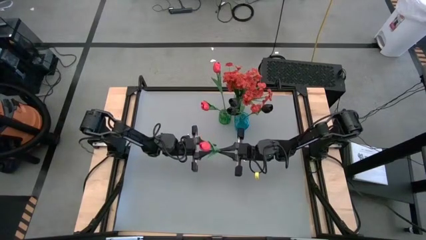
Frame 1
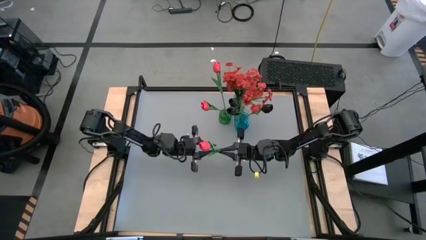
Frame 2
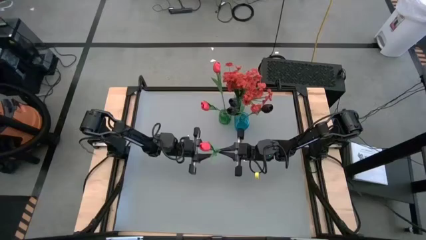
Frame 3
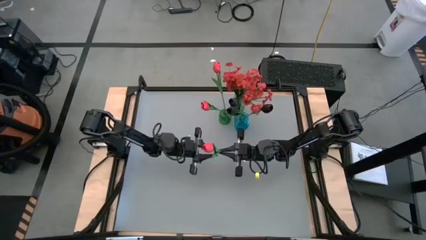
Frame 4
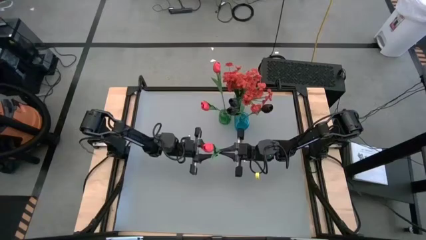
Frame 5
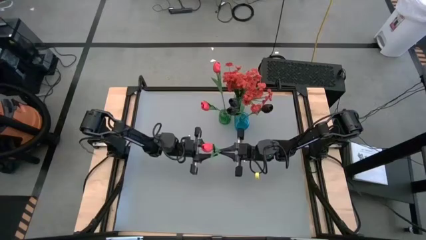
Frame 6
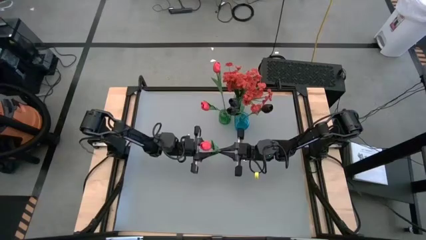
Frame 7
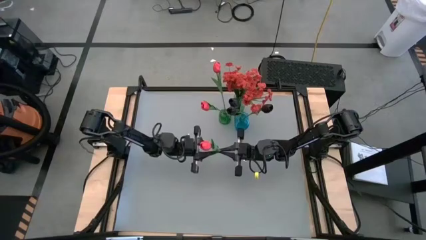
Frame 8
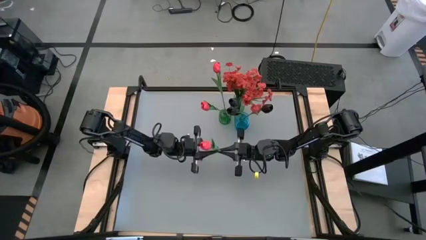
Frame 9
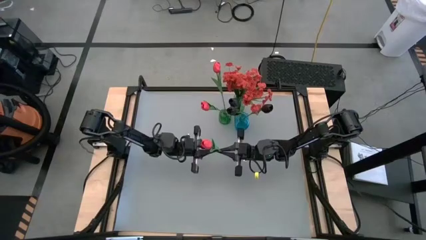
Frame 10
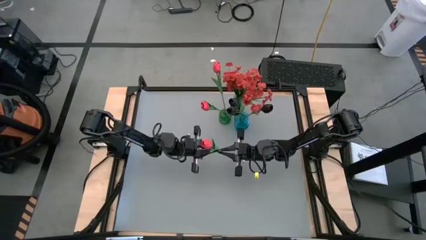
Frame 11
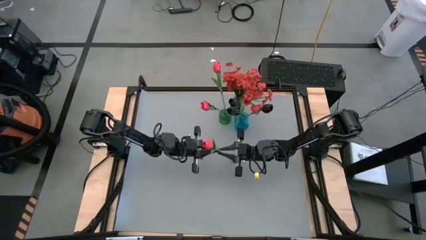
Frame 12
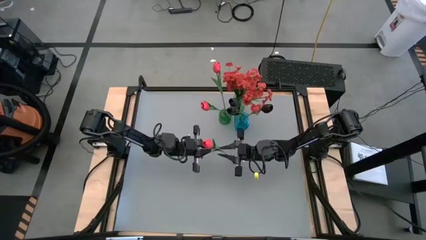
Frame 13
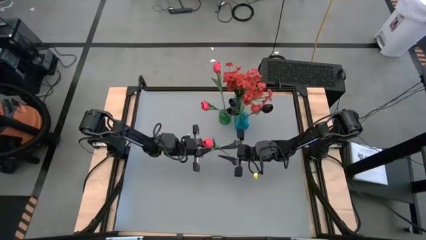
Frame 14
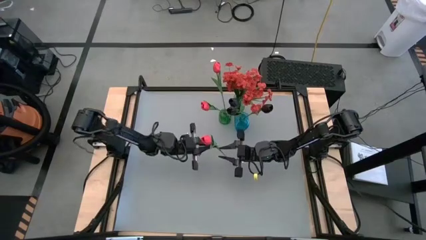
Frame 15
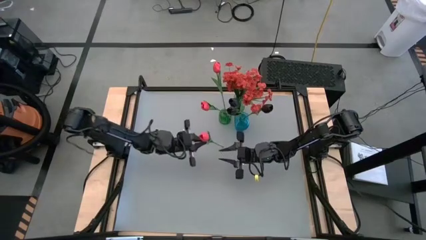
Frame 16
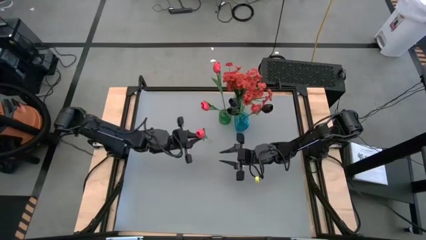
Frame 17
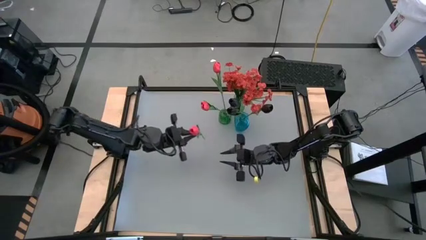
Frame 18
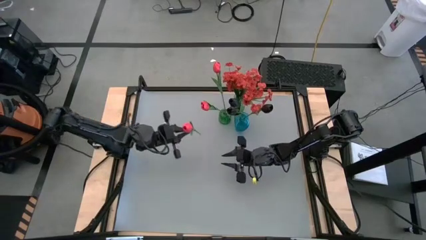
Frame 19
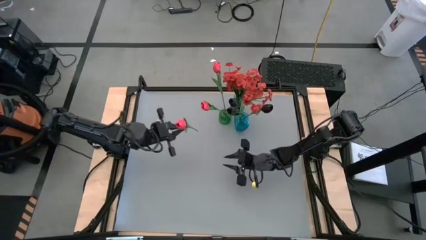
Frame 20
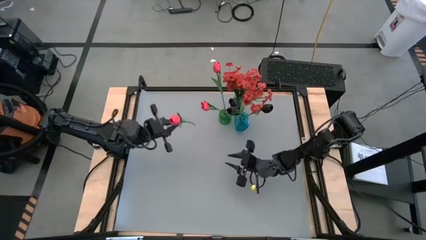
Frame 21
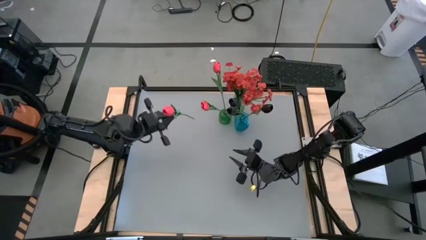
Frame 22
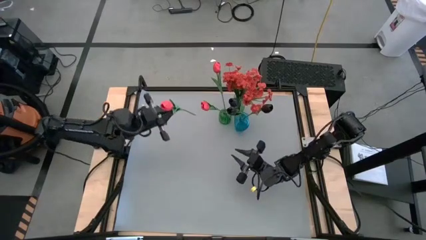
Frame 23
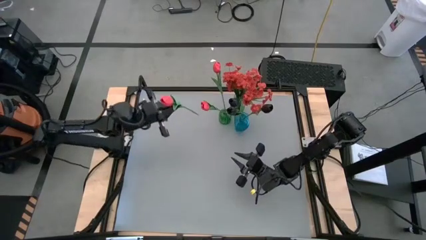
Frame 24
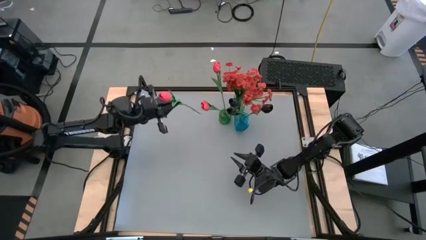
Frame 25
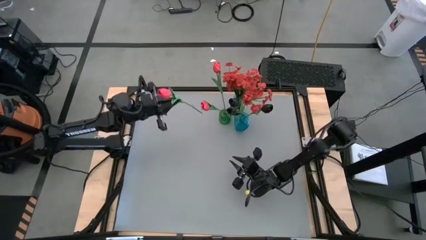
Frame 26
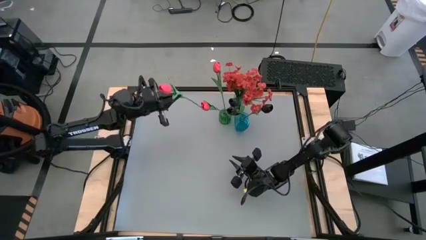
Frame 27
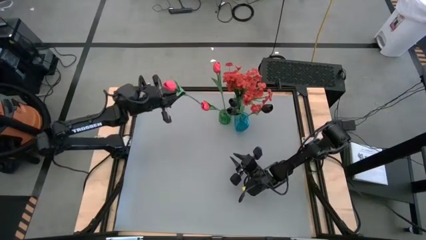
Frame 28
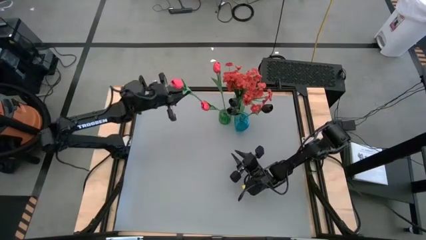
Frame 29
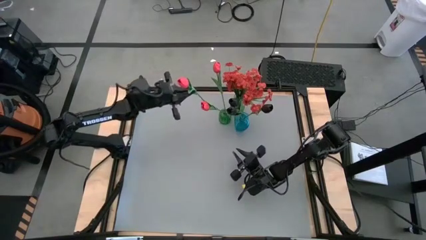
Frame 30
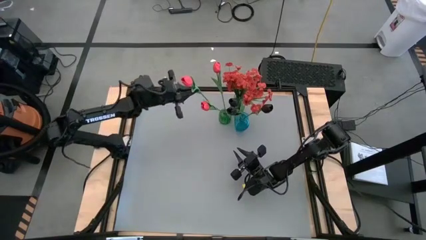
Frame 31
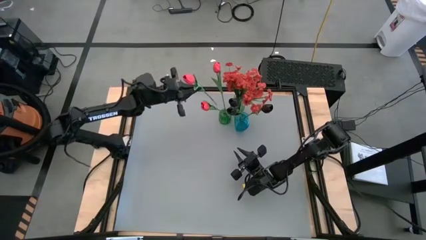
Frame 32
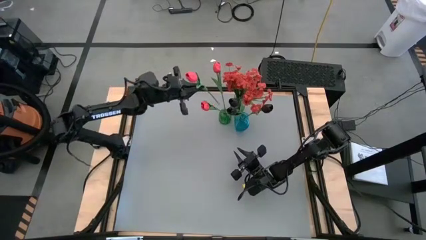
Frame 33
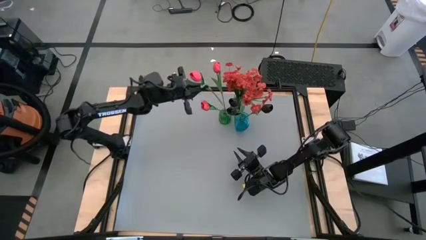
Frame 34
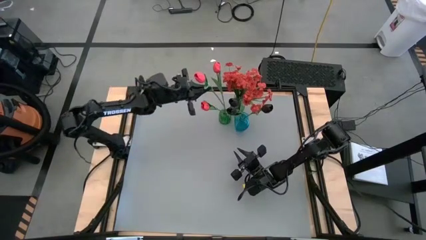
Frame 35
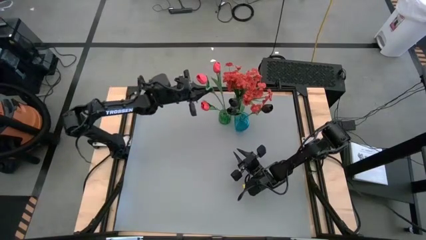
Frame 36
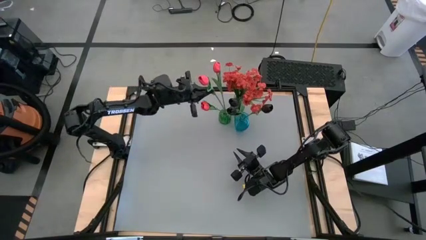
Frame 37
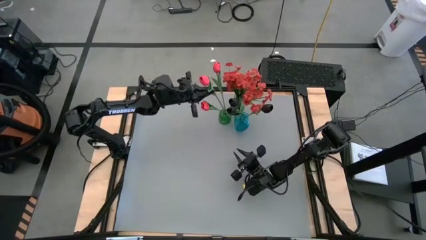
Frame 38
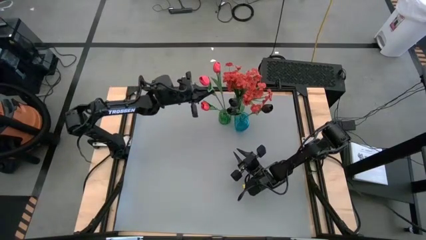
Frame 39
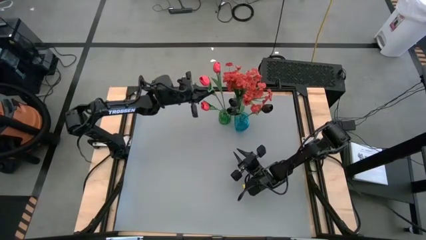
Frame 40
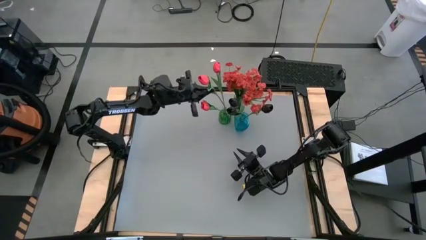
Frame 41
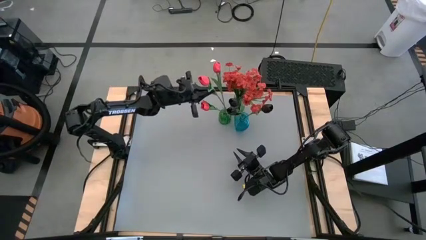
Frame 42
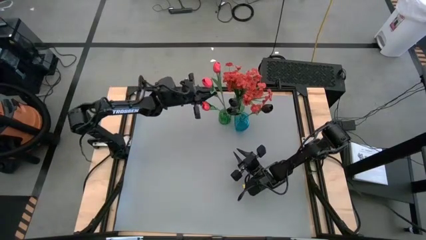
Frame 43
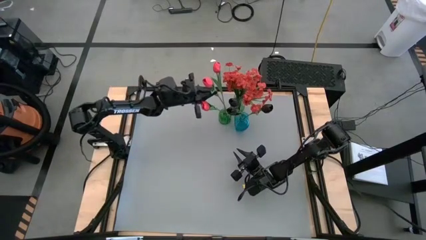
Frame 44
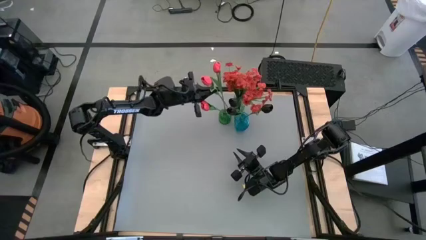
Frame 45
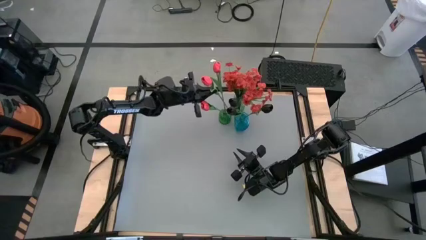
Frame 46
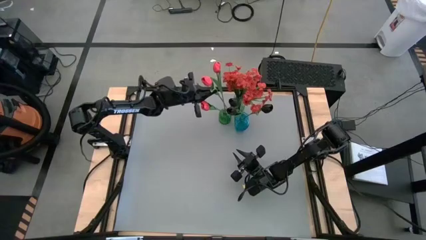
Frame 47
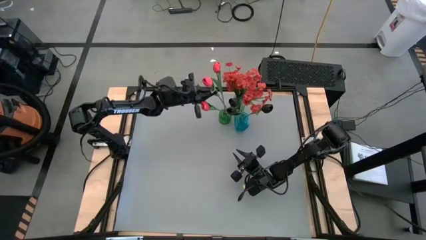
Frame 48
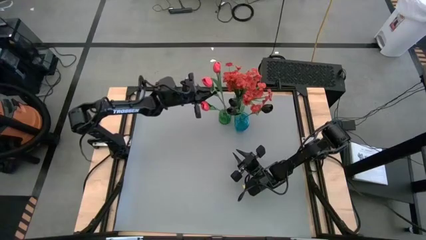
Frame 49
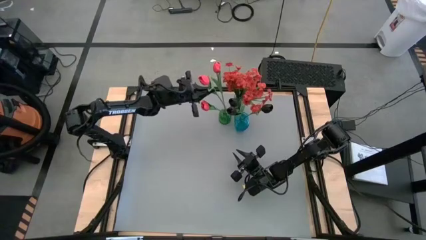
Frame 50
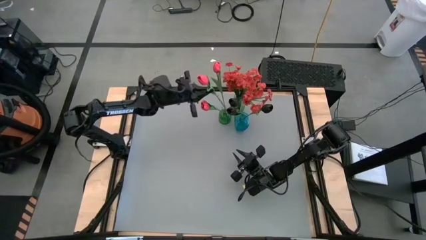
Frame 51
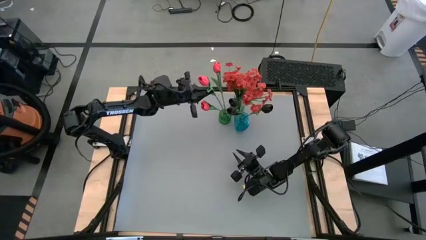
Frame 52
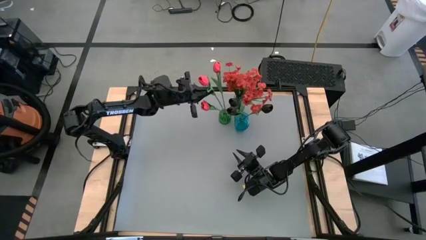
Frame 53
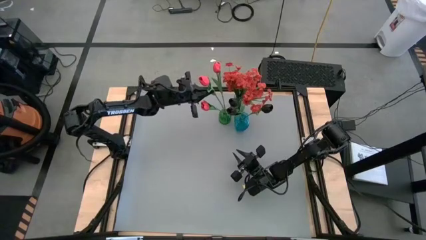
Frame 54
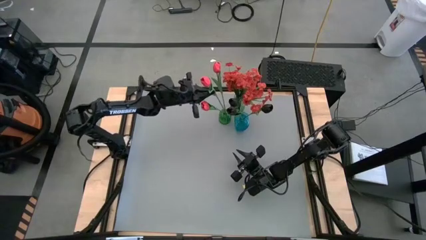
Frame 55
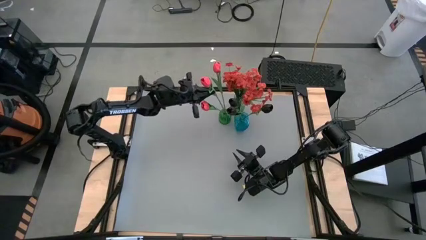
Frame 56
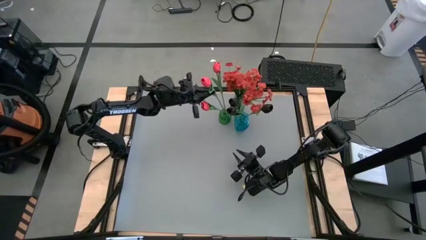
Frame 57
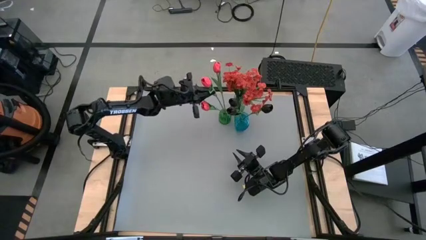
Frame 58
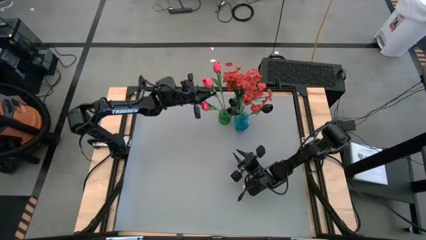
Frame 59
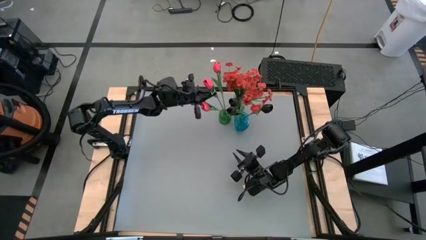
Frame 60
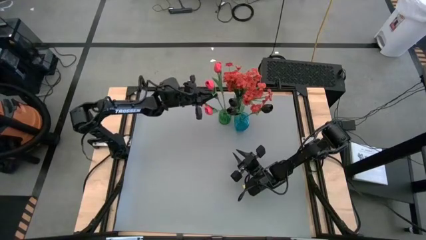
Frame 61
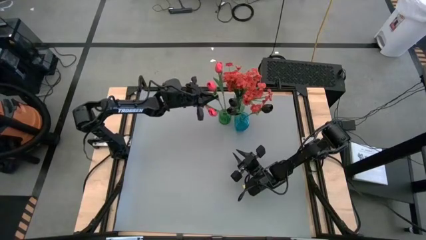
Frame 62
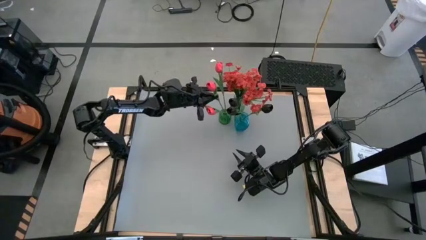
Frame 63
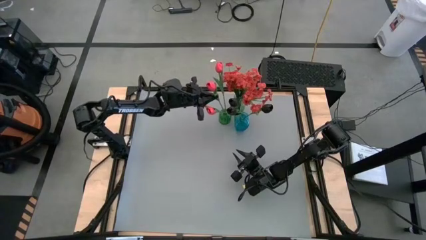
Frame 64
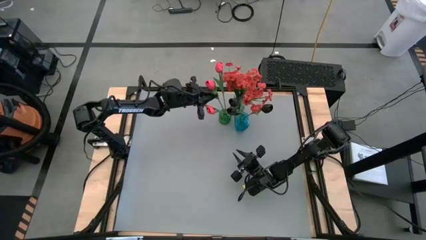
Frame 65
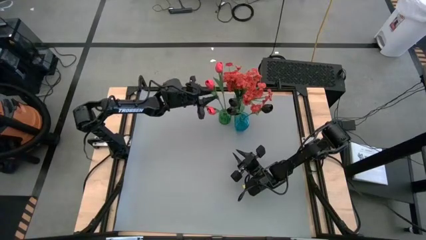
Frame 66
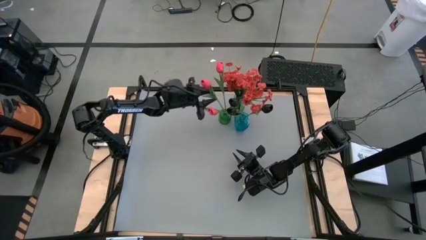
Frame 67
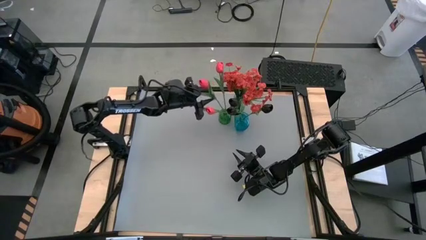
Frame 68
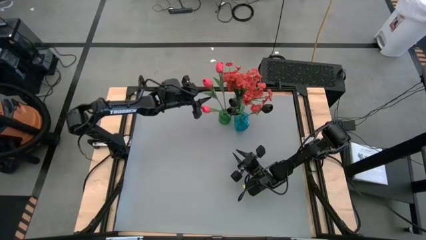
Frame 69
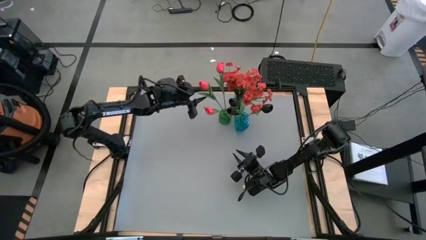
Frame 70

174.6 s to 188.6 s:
Task: Sort flowers into vase by color
Put the pink flower into the bottom green vase

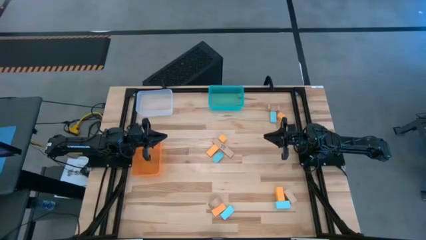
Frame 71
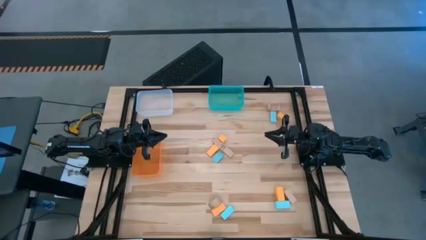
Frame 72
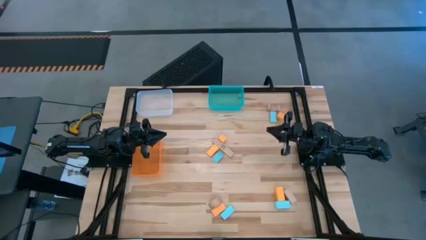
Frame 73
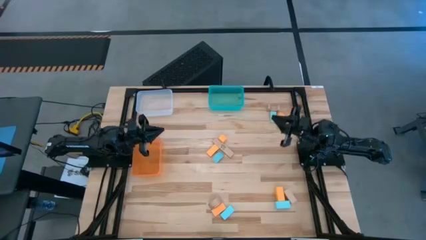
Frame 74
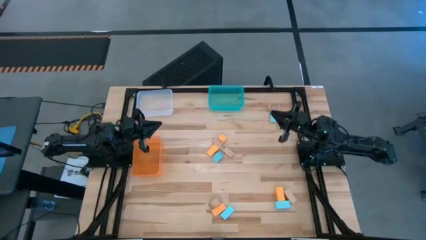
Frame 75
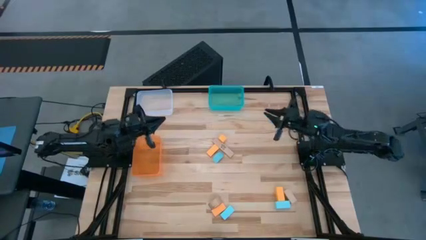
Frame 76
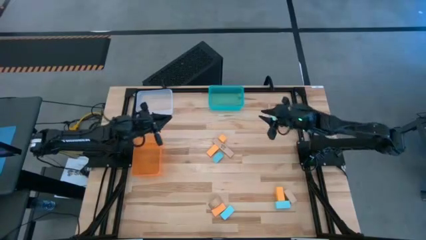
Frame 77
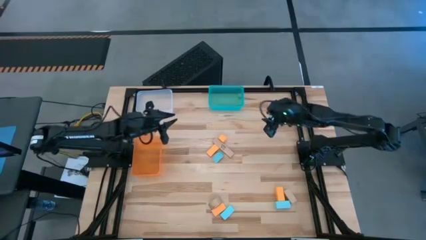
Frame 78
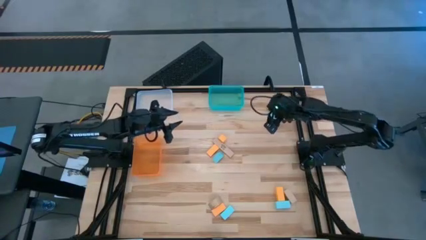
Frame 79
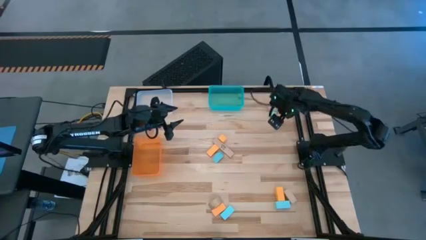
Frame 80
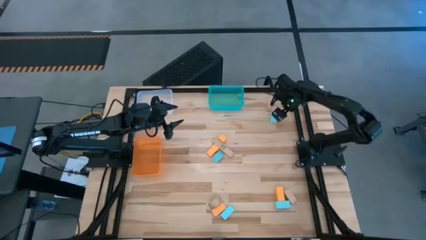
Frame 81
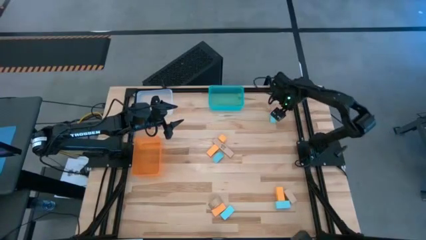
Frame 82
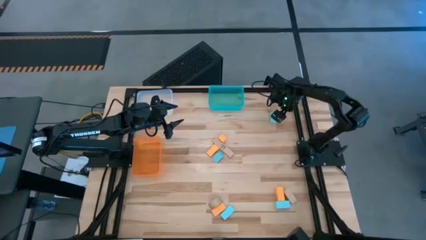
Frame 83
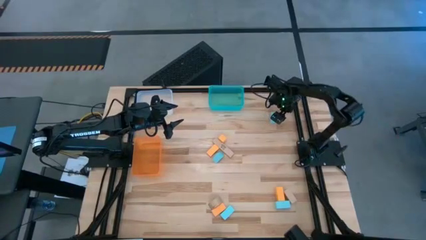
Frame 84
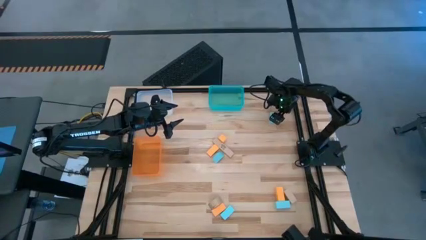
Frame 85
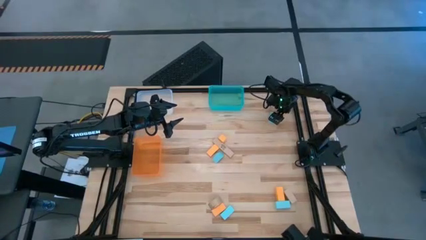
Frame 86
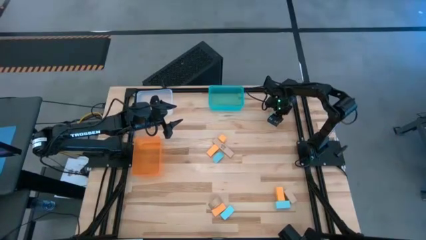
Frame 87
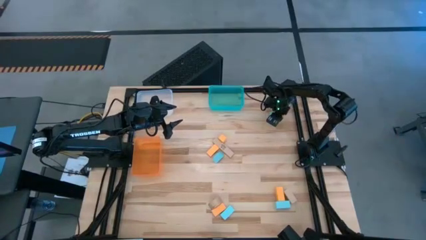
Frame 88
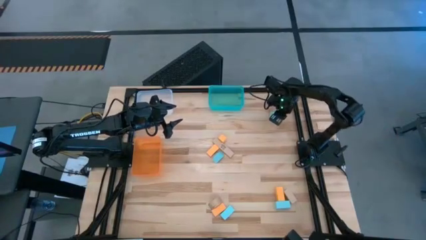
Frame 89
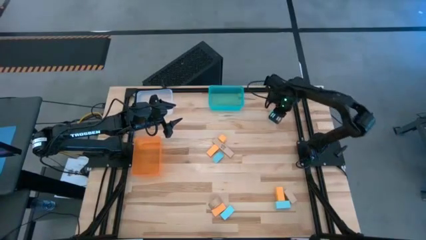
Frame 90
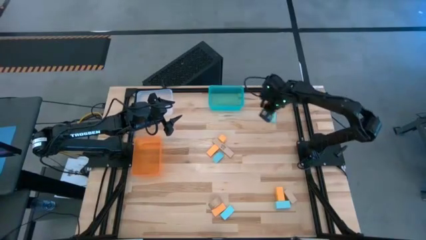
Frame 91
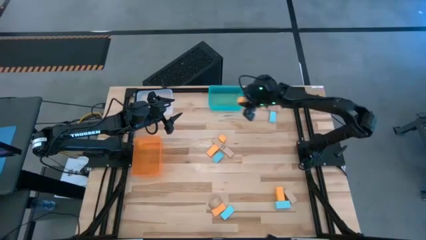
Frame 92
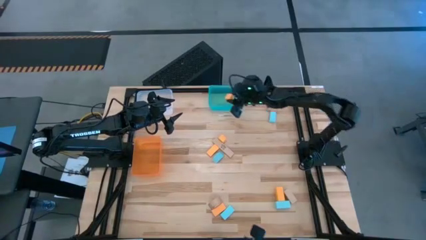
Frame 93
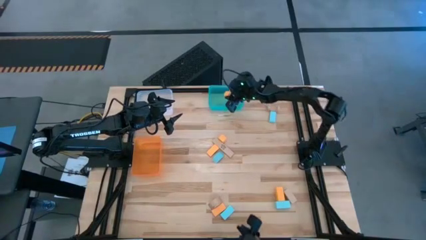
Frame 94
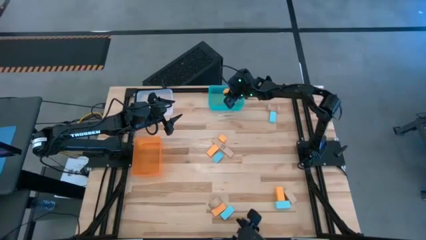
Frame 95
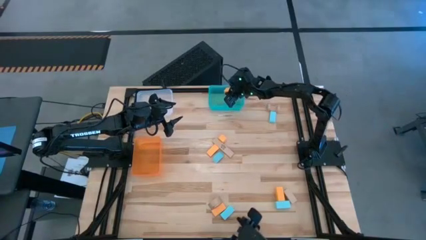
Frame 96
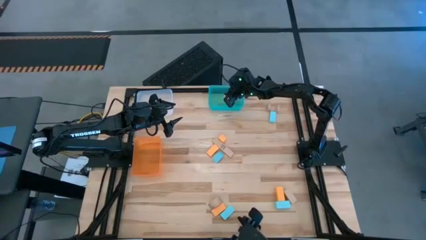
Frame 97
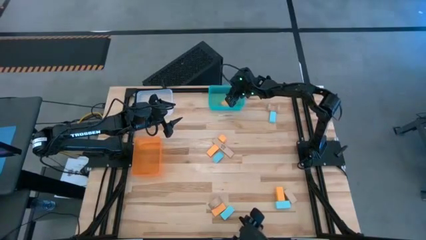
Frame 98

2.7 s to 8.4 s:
Task: Sort & place blocks by color
Put the yellow block into the green bin
